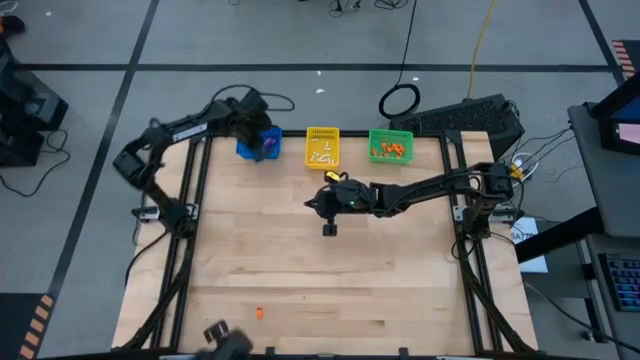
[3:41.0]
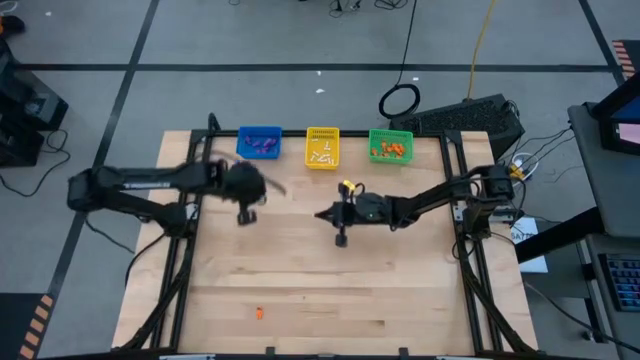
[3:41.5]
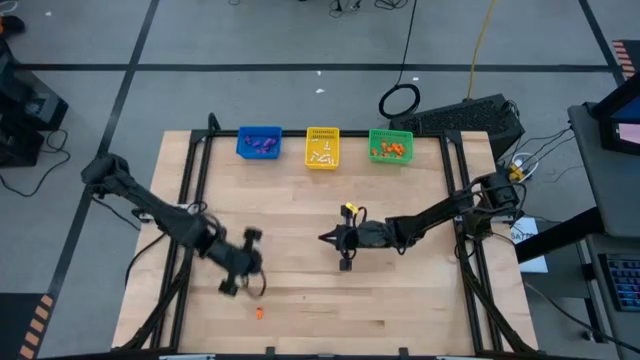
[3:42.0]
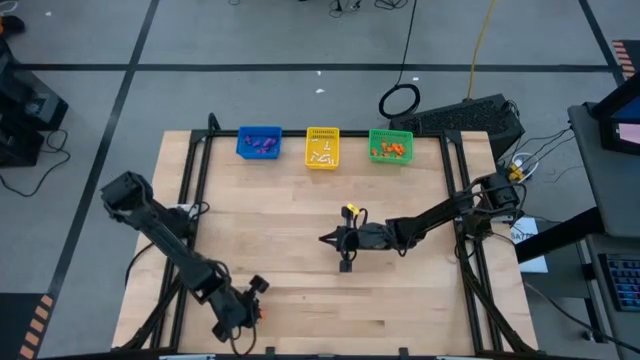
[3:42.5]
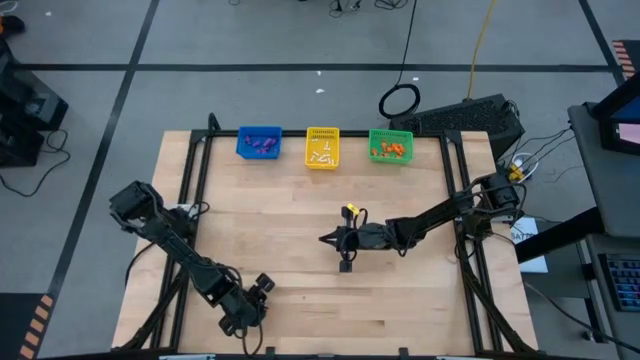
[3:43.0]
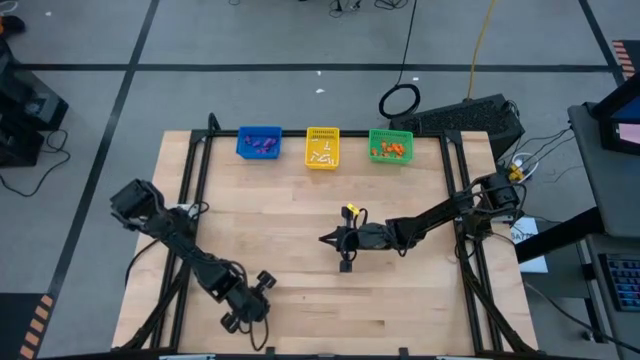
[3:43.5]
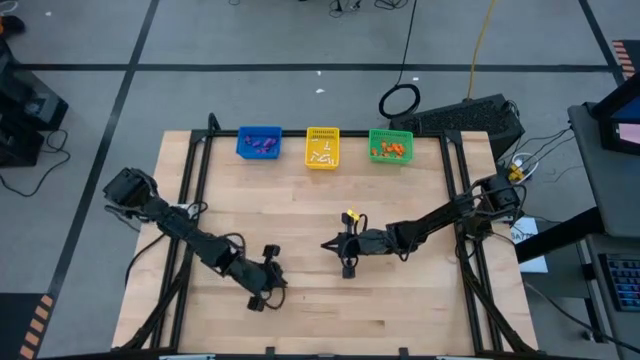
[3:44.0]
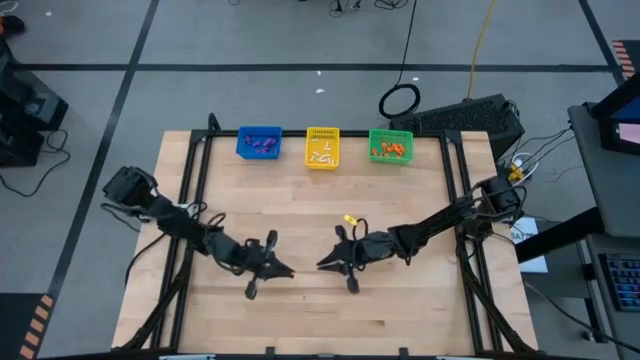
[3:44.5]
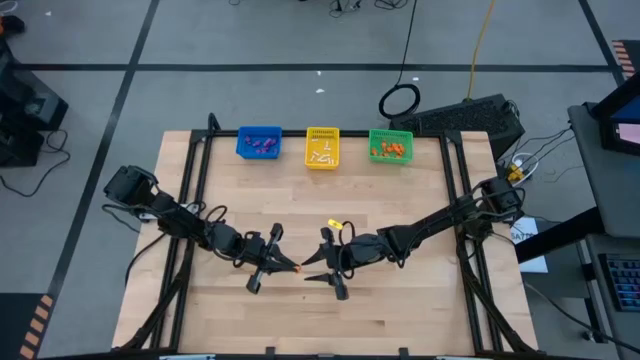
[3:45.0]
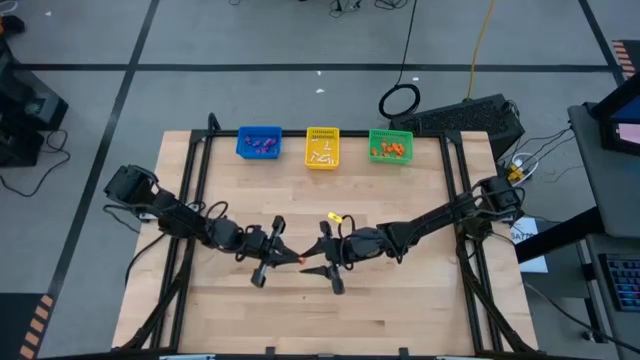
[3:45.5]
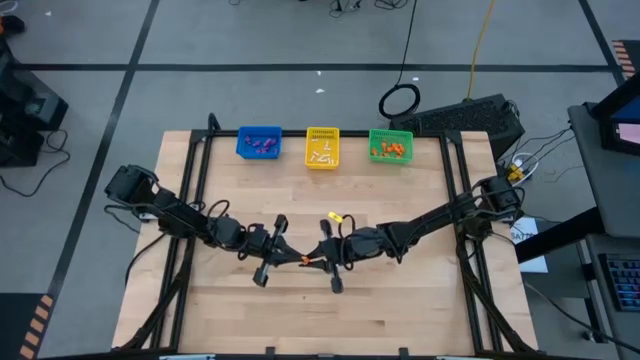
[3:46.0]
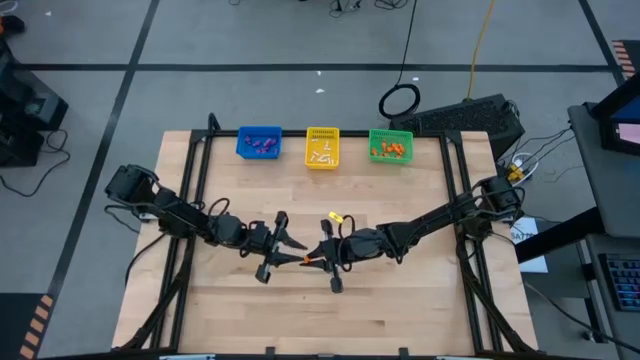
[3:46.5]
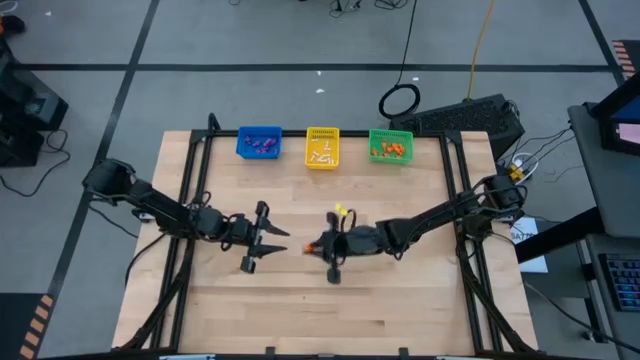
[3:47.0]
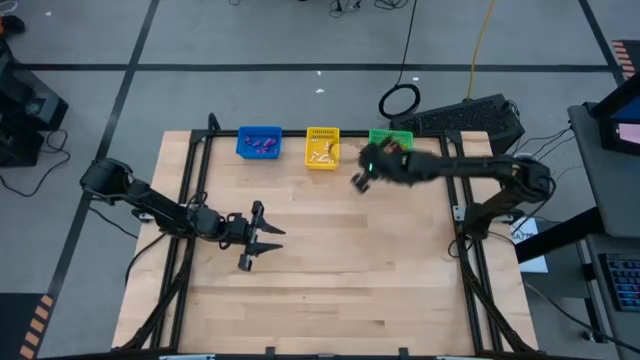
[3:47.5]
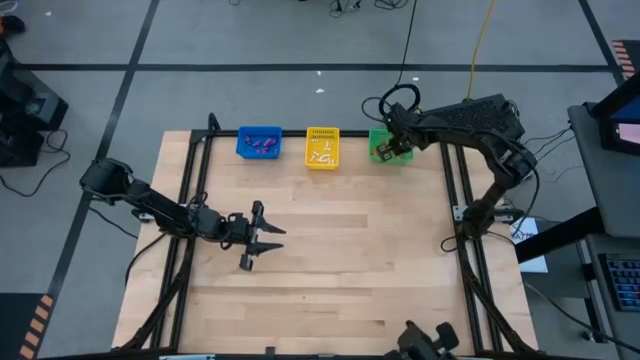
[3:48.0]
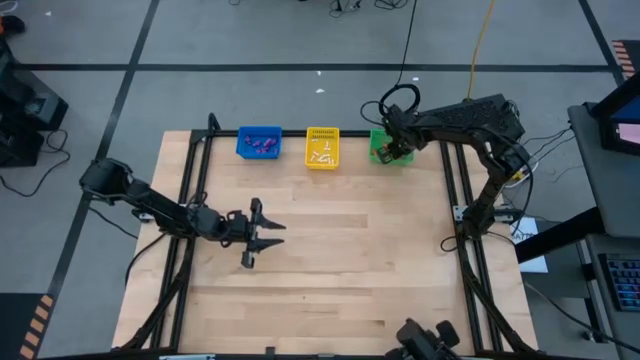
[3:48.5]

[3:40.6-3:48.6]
Task: Sort Halloween decoration
Put the orange skeleton toy into the green bin

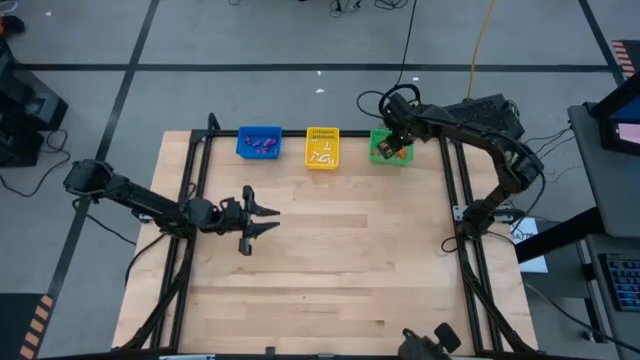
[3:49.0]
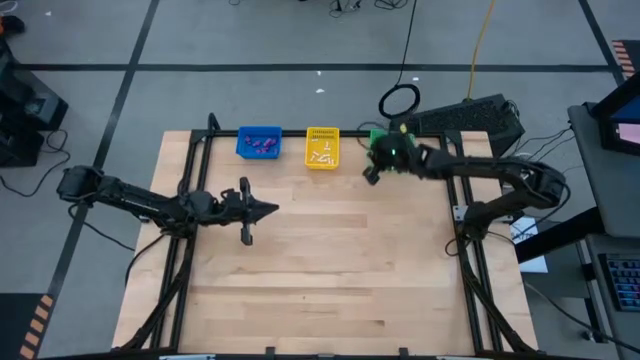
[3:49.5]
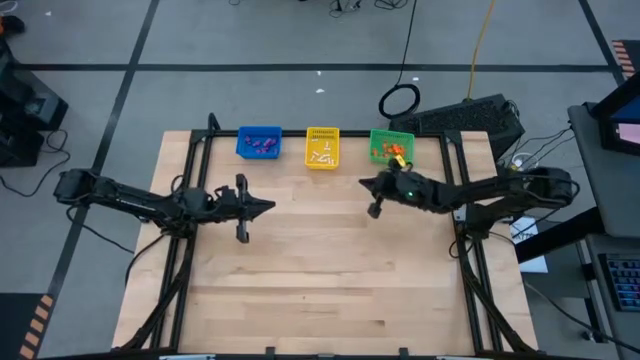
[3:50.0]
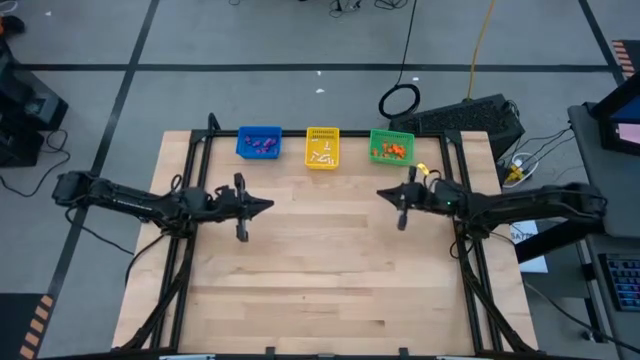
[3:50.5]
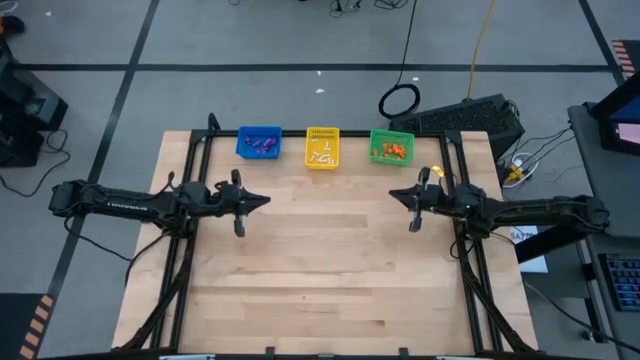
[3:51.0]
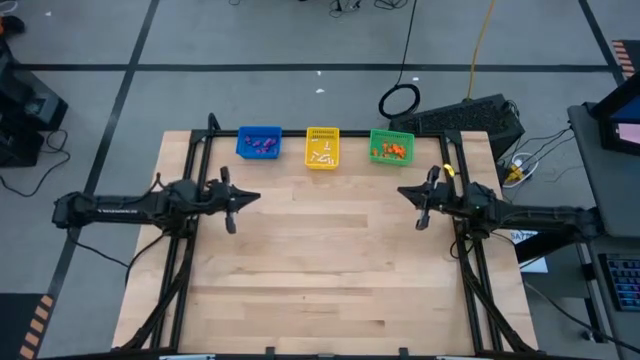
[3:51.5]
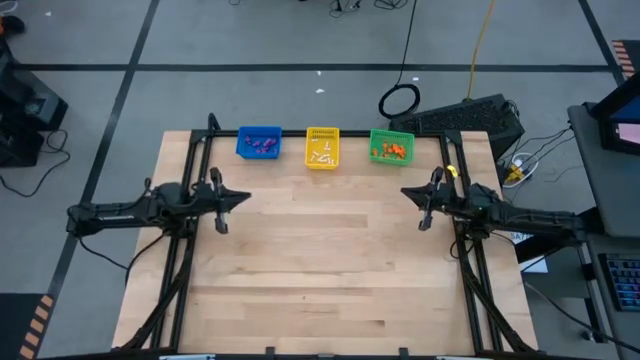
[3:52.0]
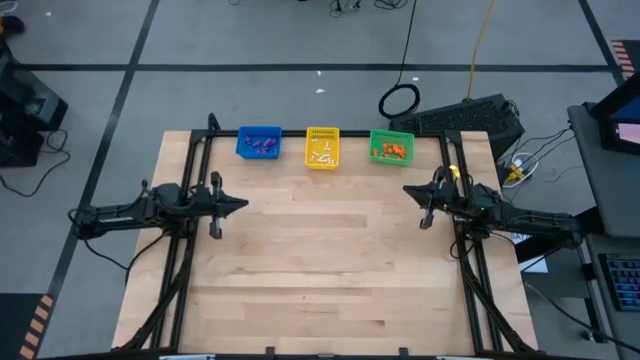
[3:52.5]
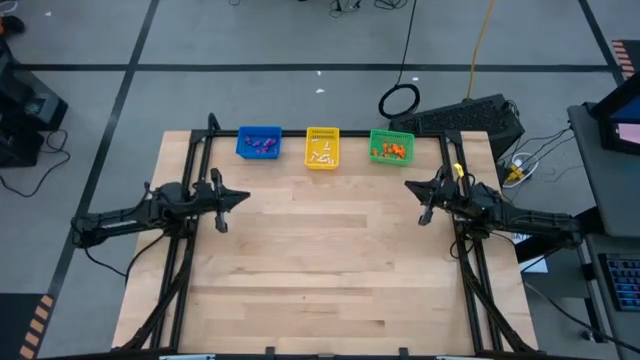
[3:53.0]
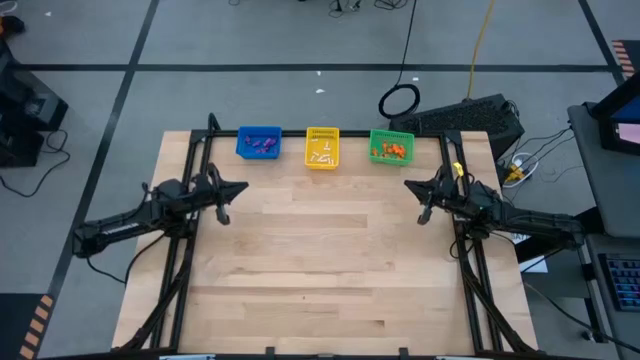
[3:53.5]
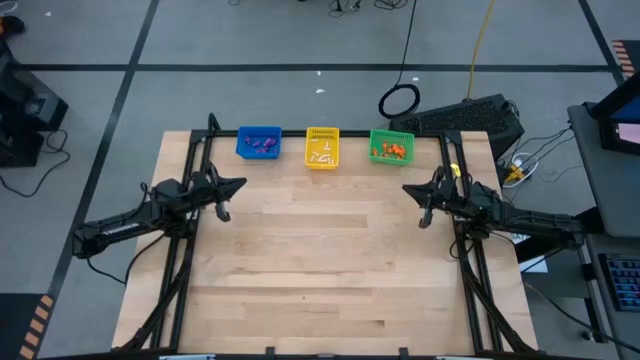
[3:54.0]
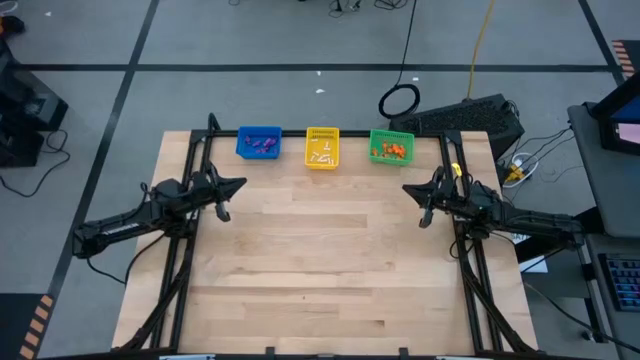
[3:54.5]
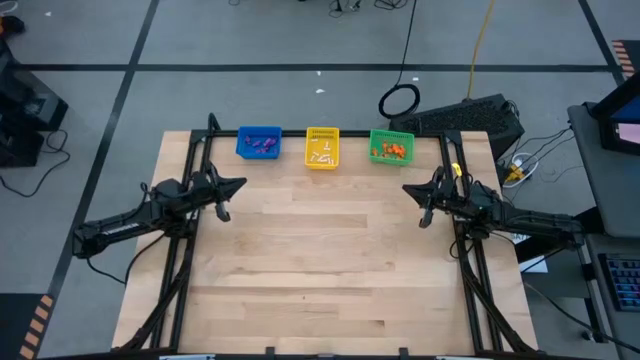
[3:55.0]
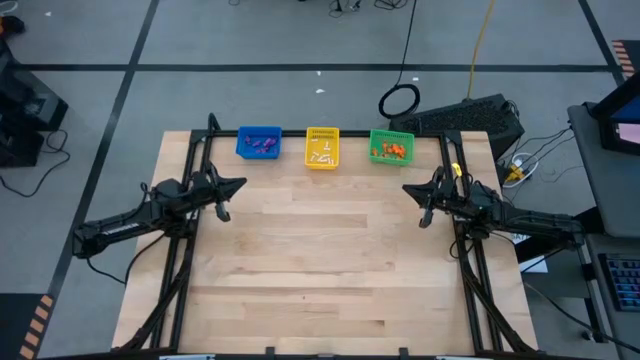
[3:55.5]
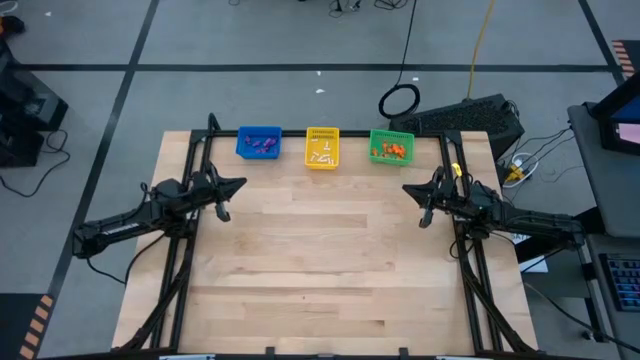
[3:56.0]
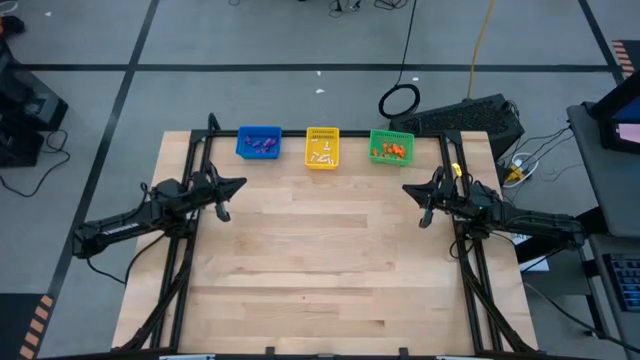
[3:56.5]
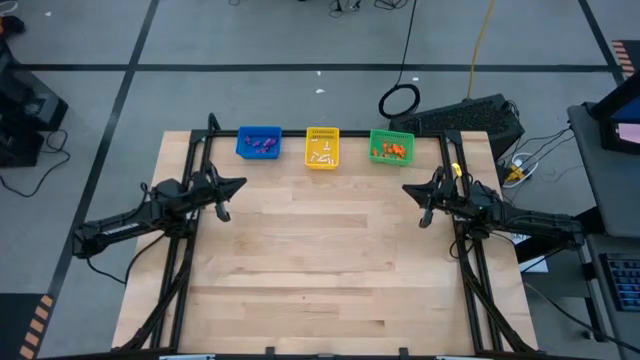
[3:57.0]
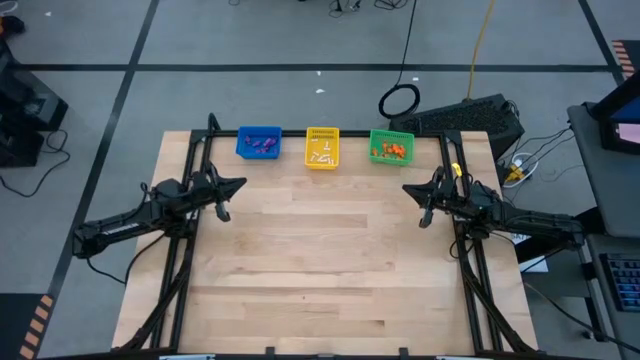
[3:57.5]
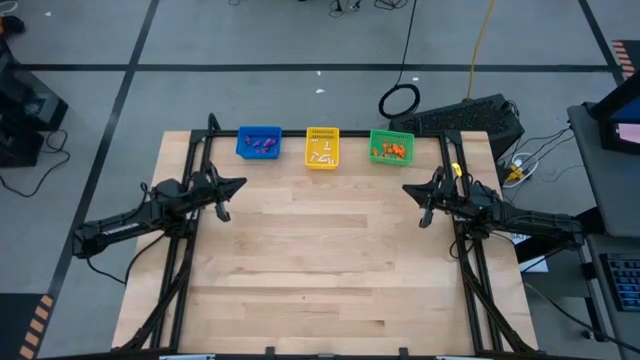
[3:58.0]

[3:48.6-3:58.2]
Return to Home Position

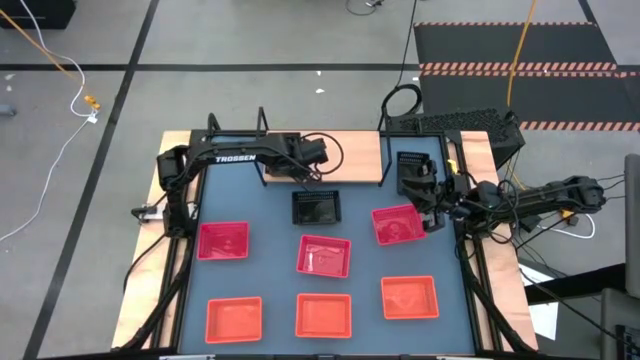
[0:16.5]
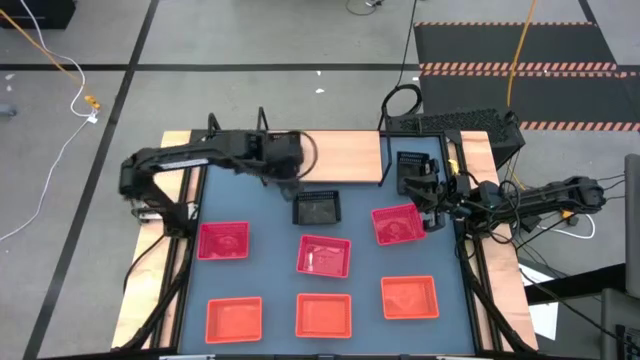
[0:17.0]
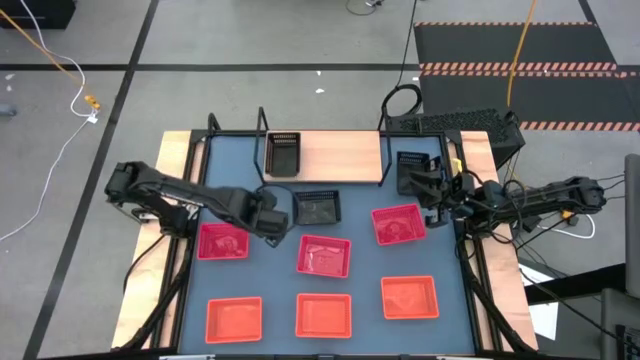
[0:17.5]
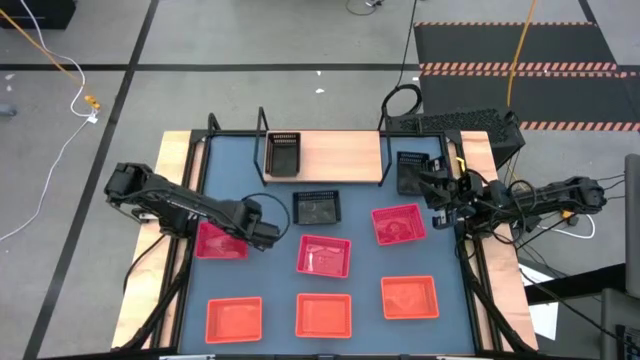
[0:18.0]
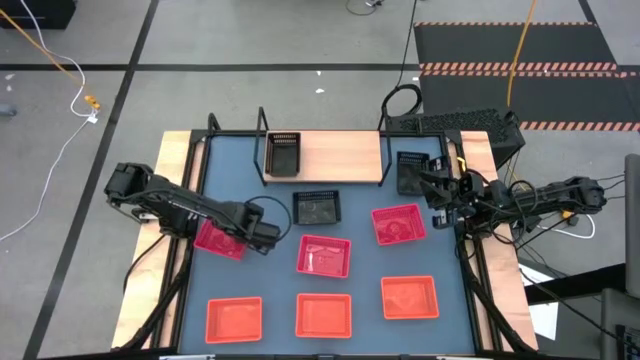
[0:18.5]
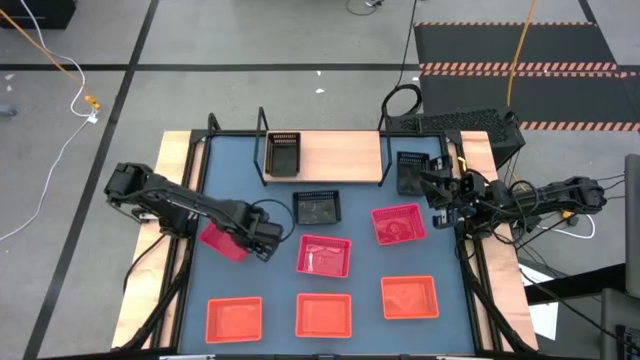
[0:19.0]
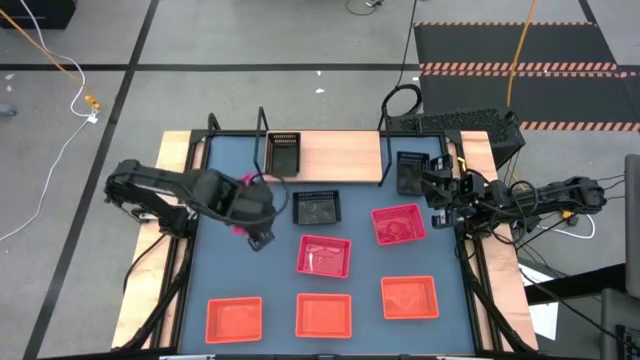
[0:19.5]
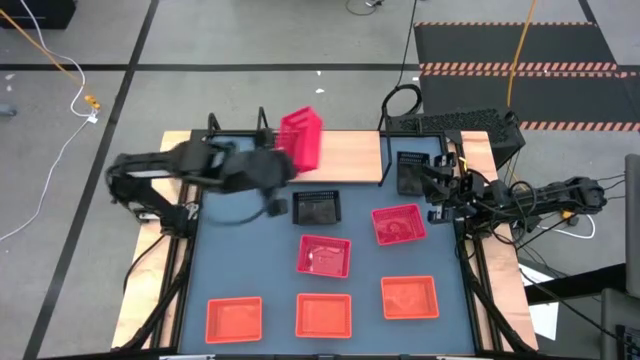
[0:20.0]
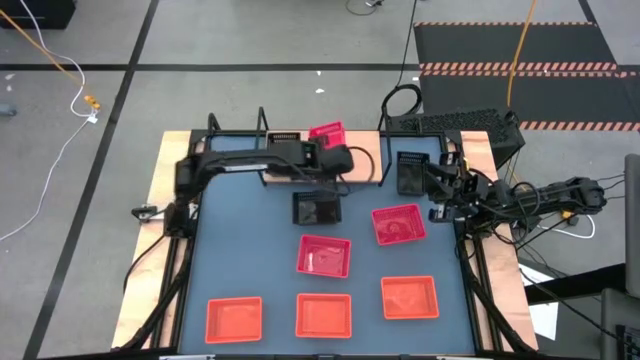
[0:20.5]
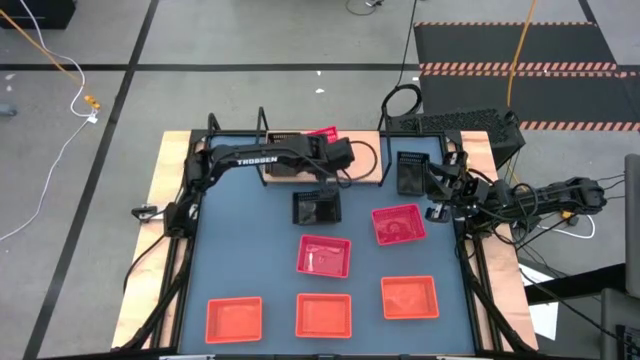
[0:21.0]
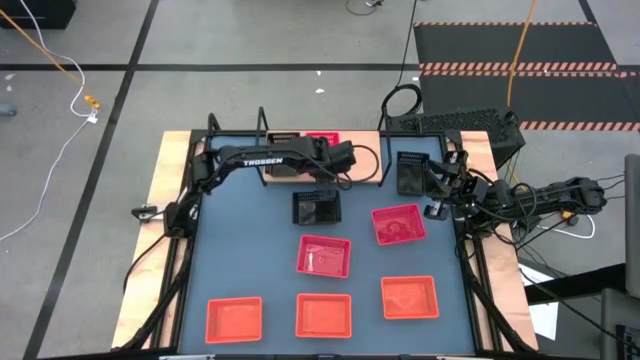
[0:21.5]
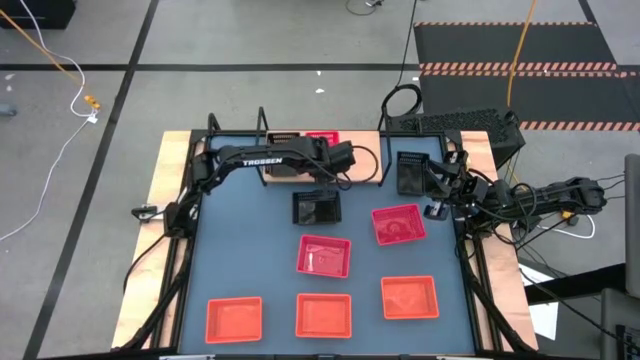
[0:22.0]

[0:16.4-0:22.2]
Task: Stack baskets on shelf by color
Put the left red bin on the shelf
